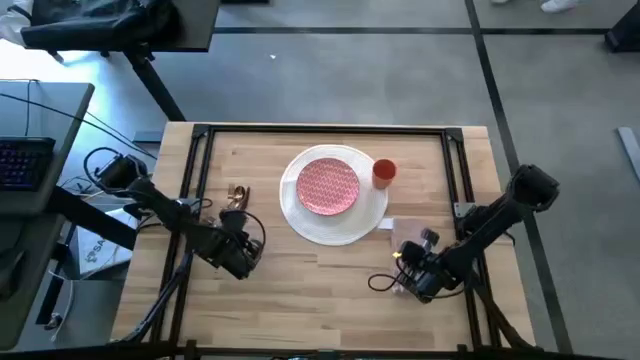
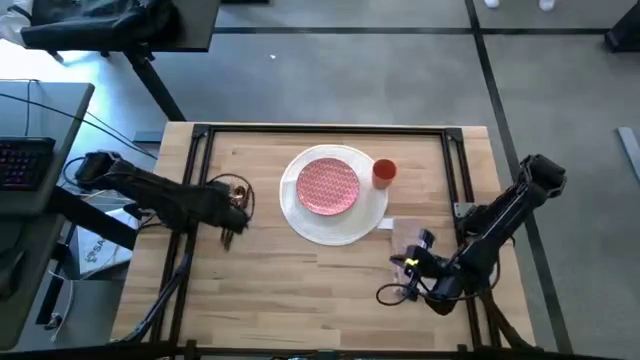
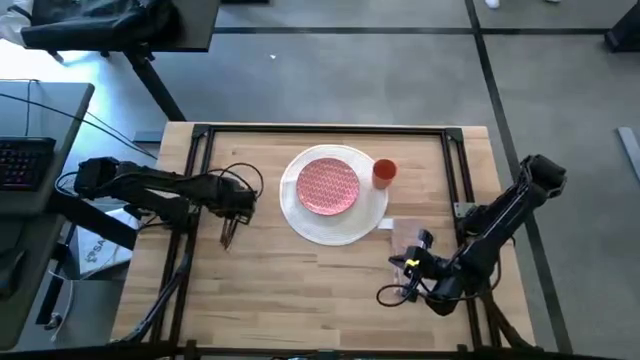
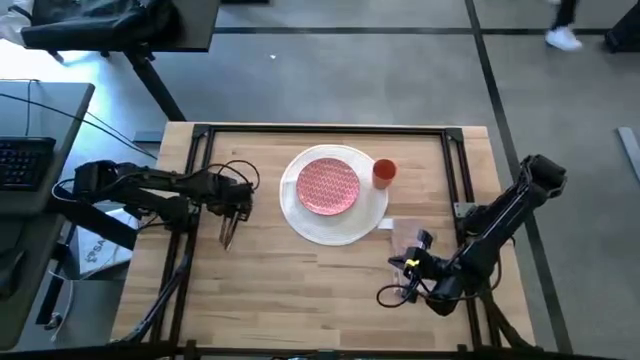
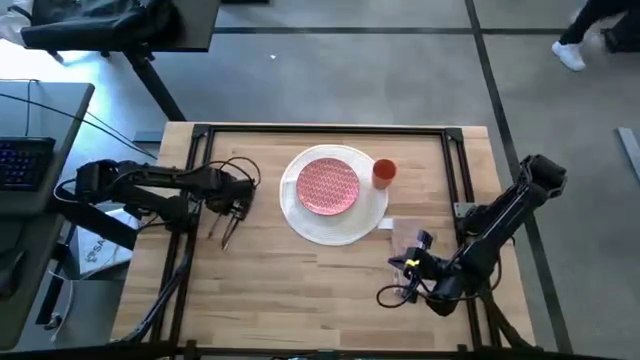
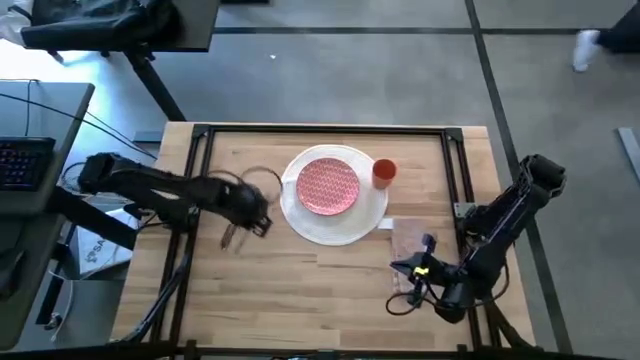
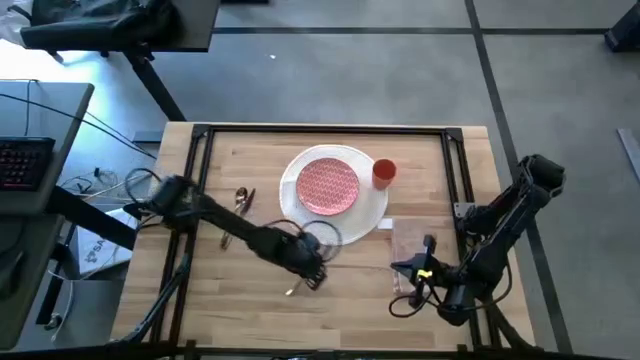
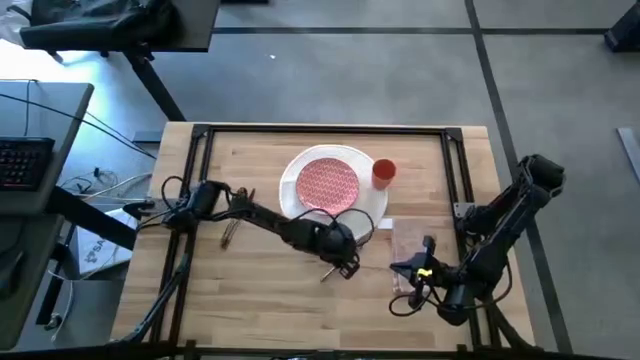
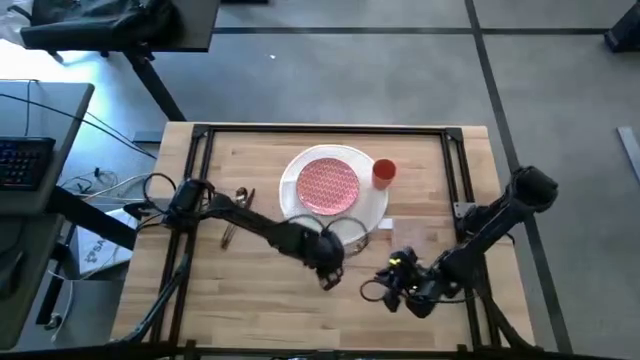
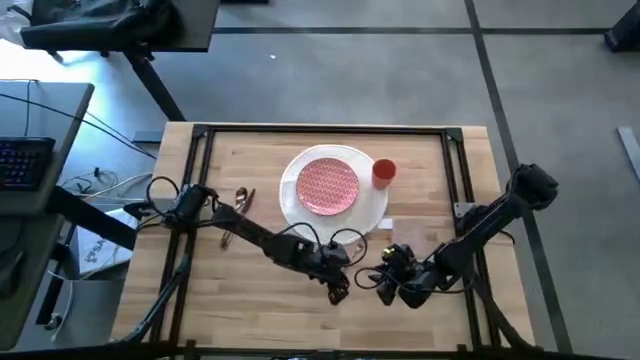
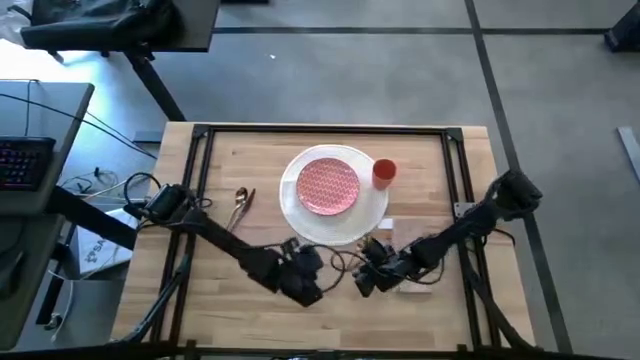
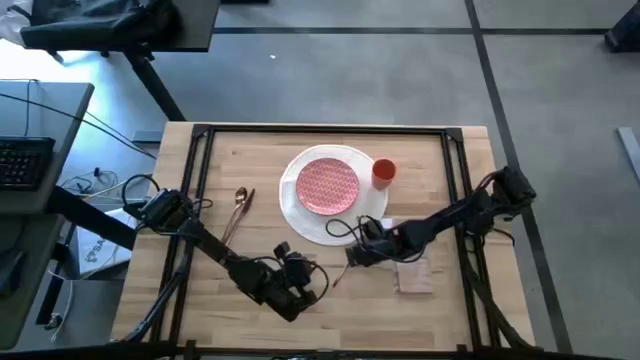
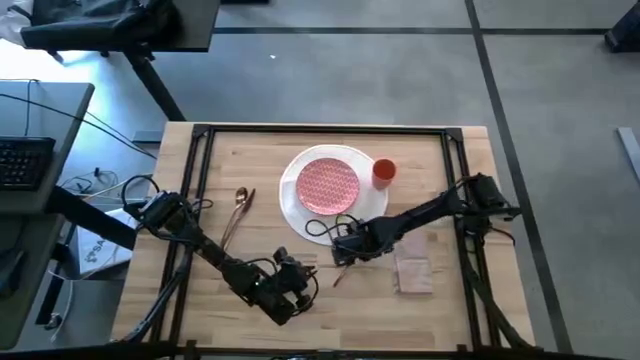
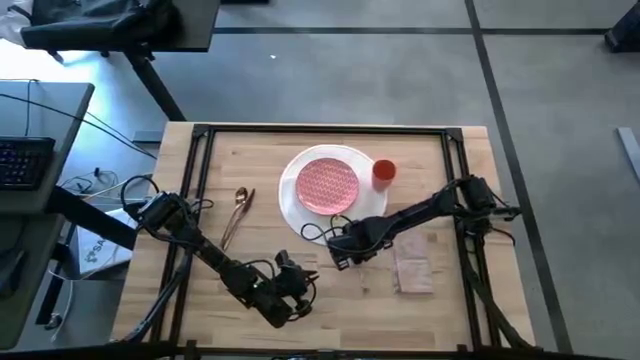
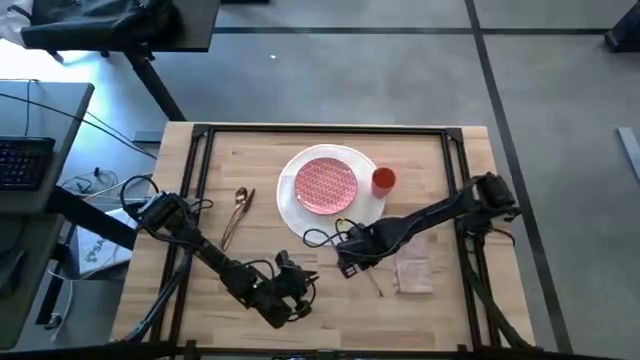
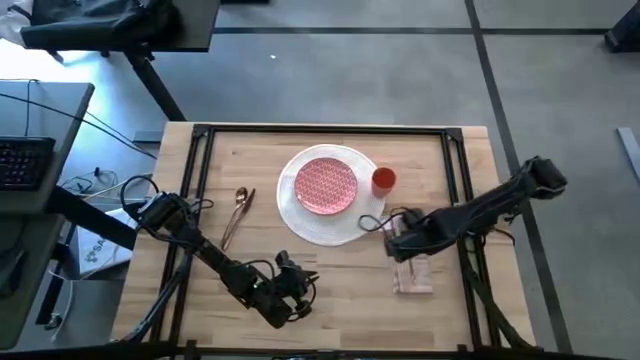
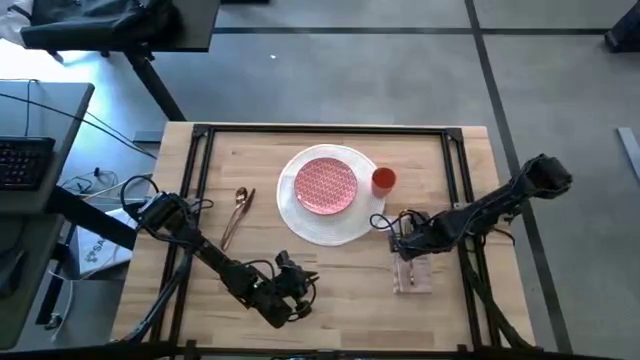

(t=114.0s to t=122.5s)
Task: Set table place
Put the fork onto the napkin

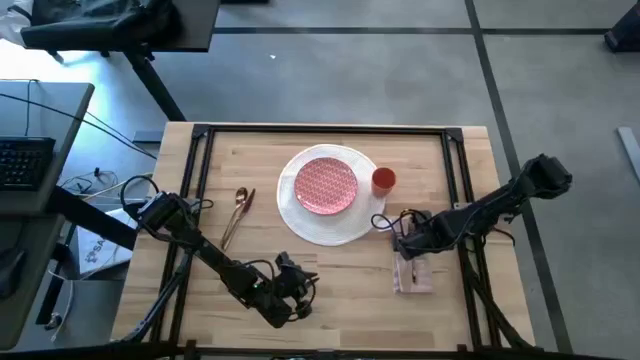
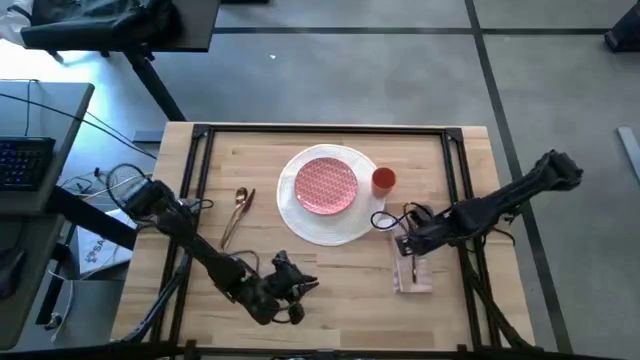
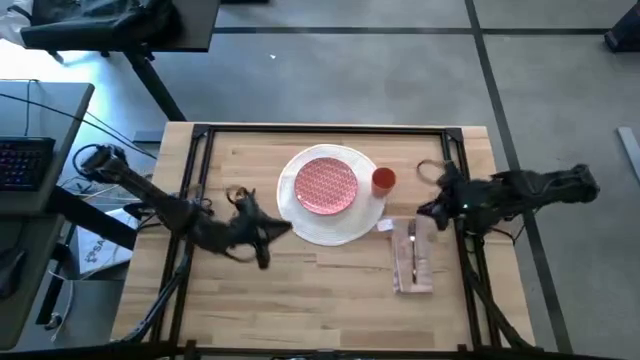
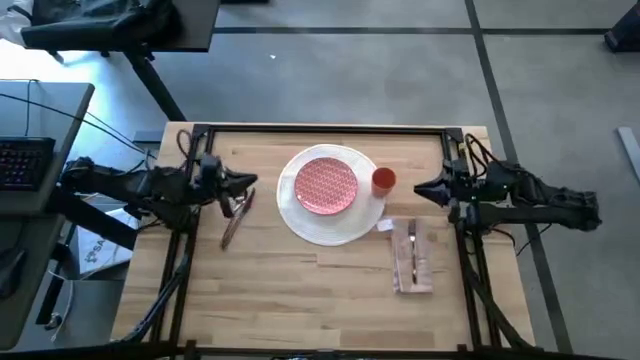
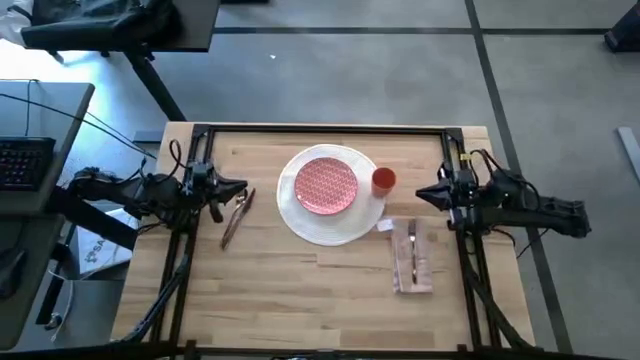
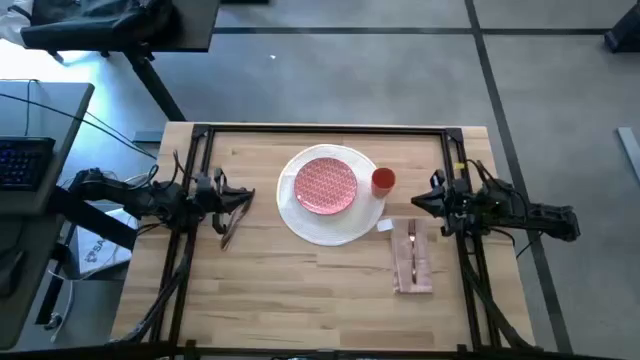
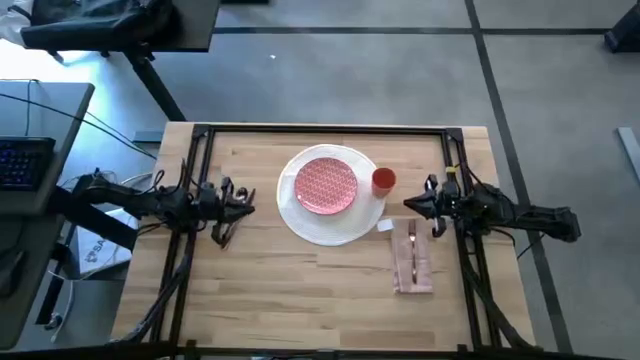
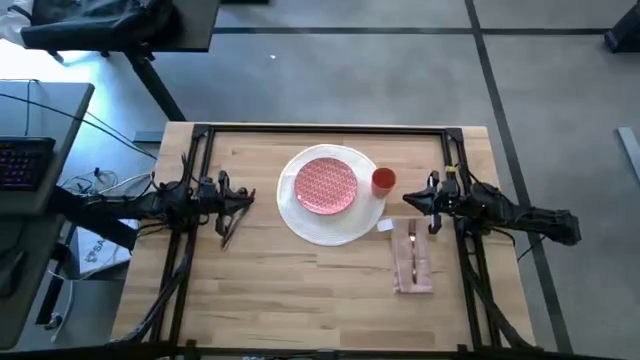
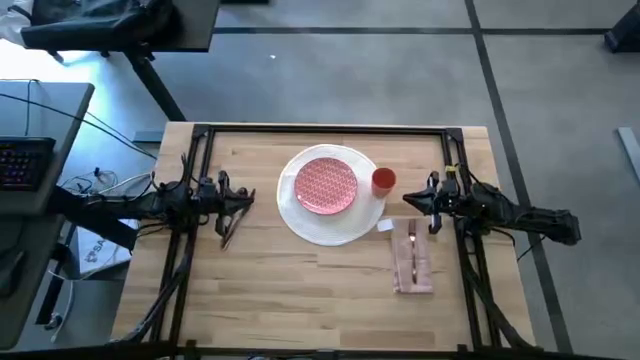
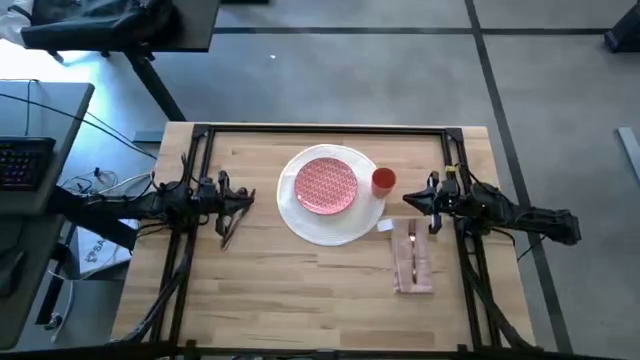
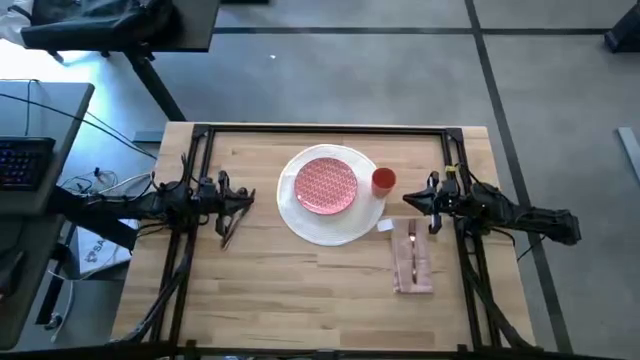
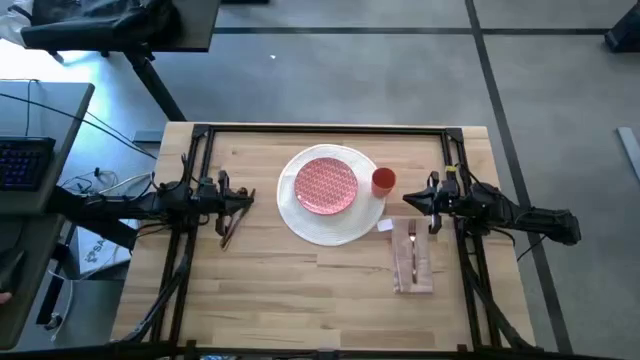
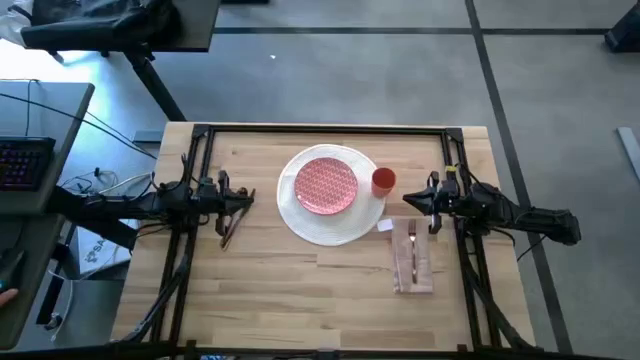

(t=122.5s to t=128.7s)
Return to Home Position

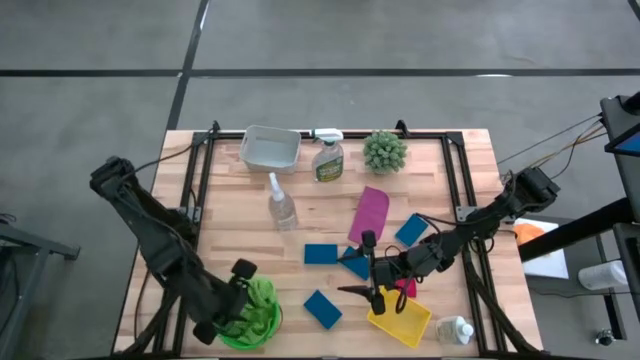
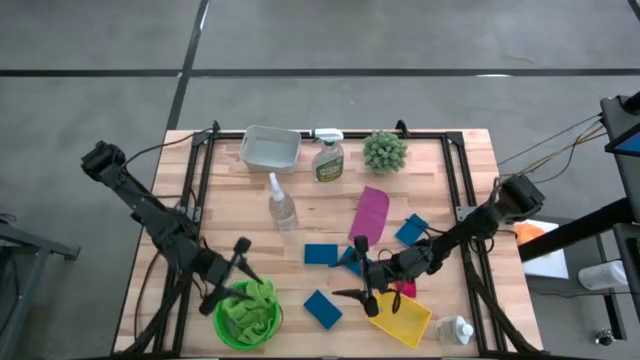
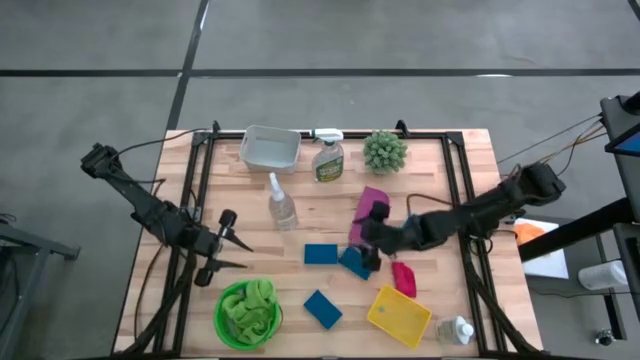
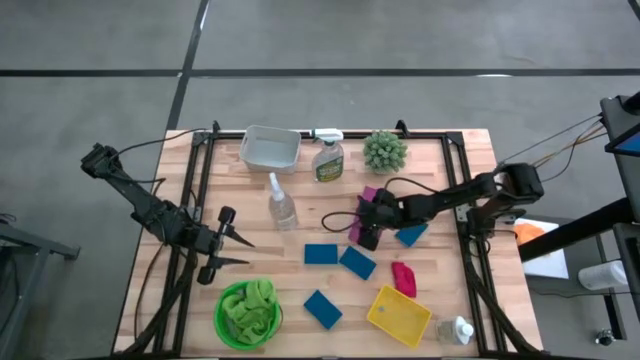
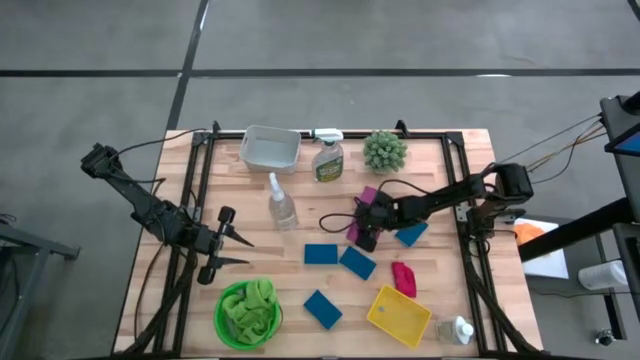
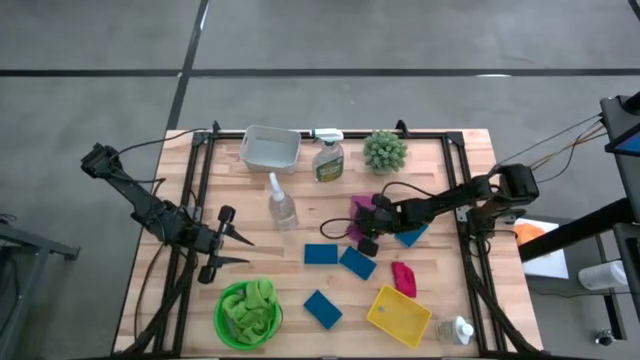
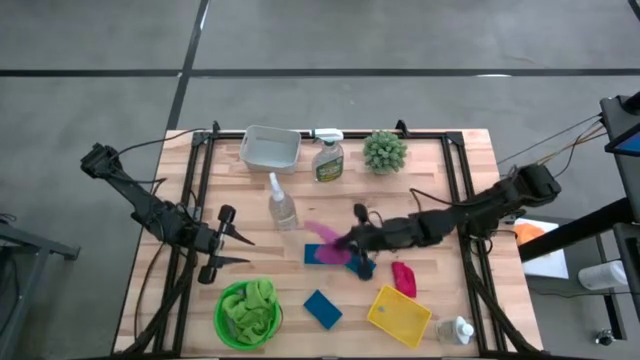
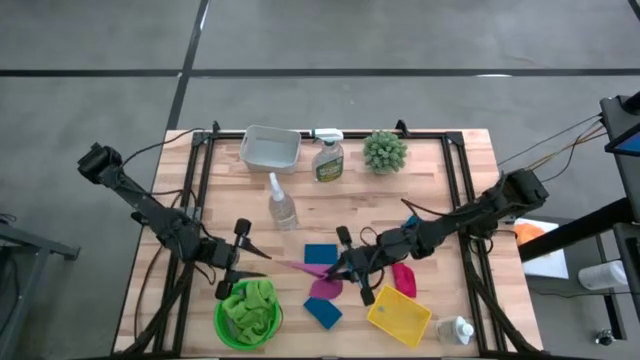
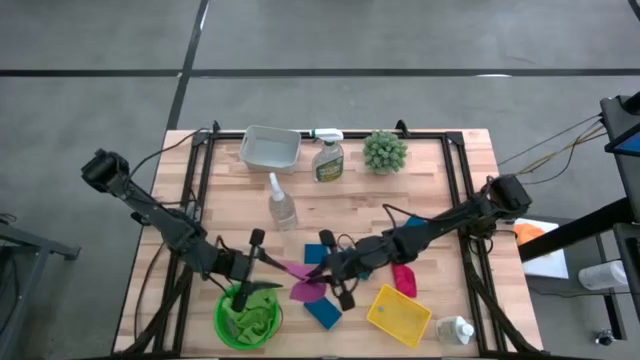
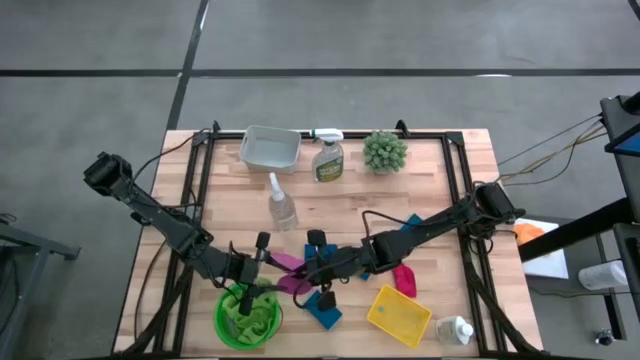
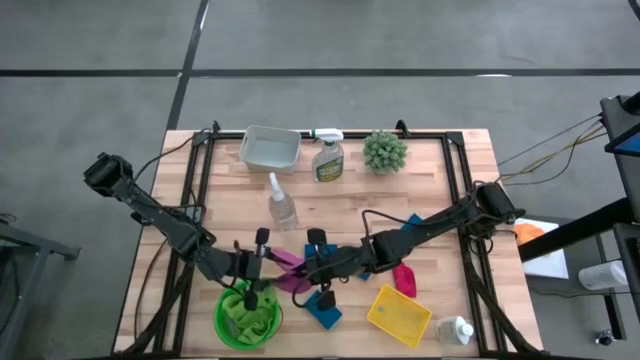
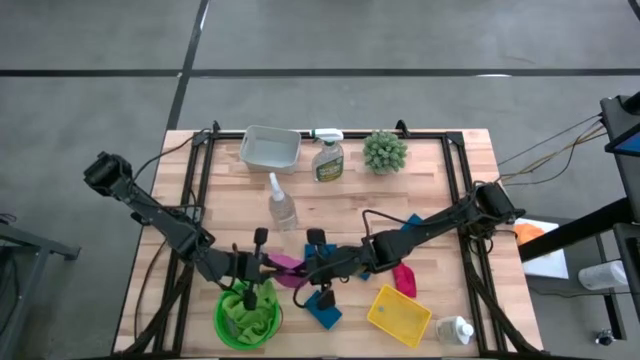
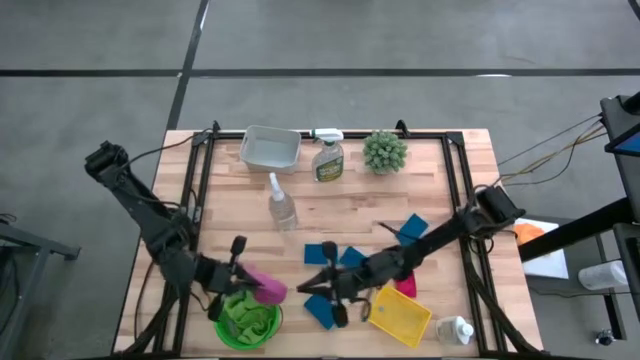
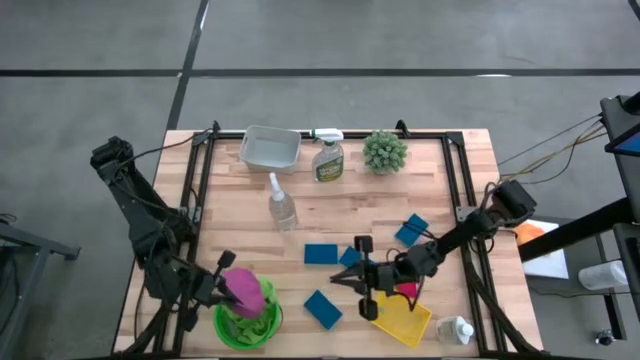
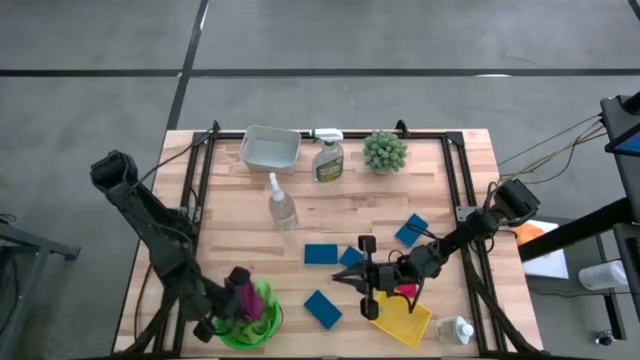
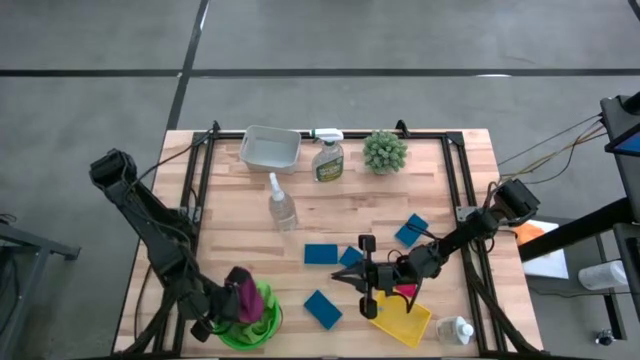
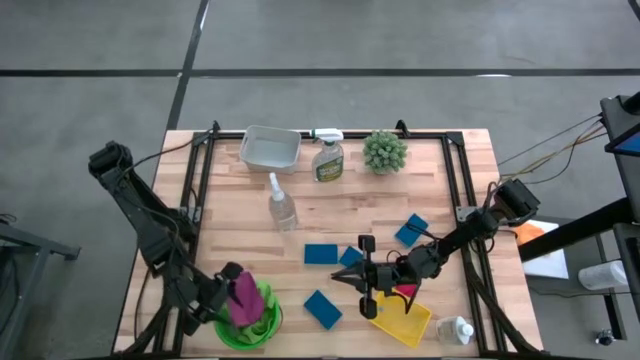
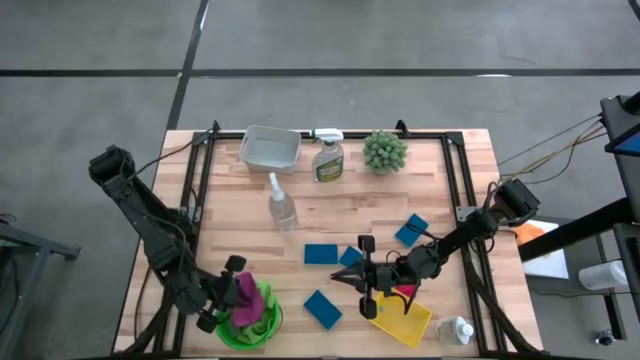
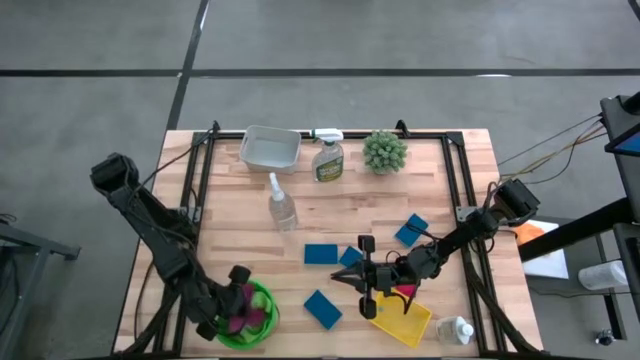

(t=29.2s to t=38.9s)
Task: Pick & Place Kitchen Items
Put the purple microfiber cloth into the green basket
